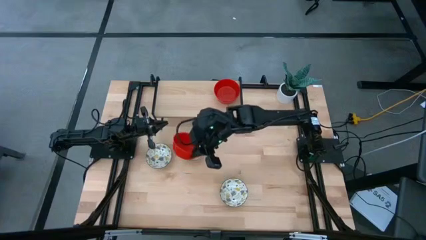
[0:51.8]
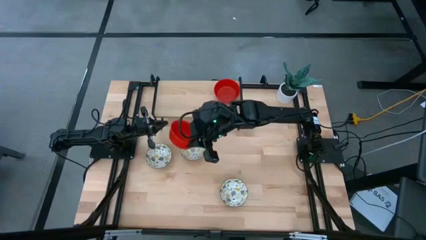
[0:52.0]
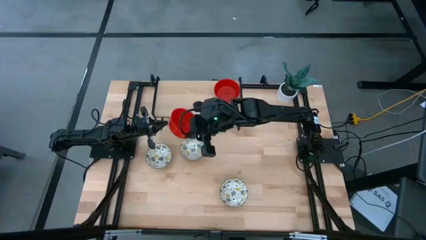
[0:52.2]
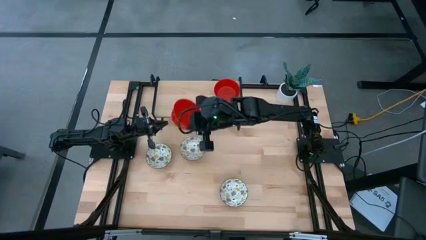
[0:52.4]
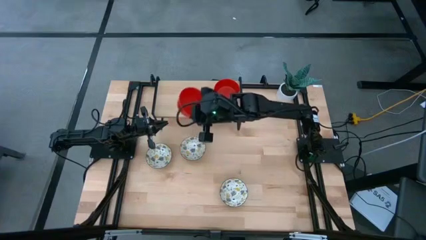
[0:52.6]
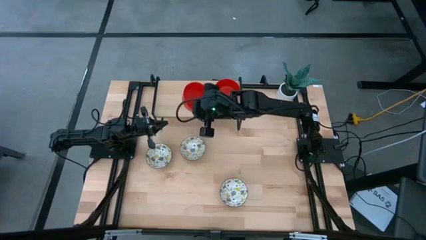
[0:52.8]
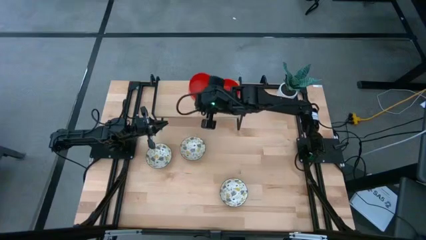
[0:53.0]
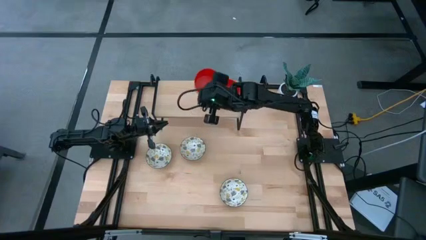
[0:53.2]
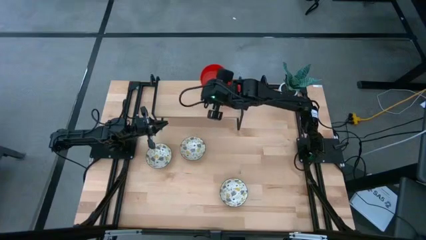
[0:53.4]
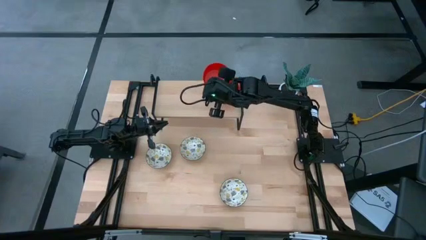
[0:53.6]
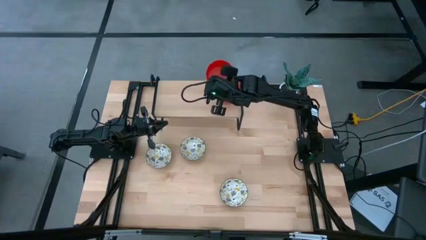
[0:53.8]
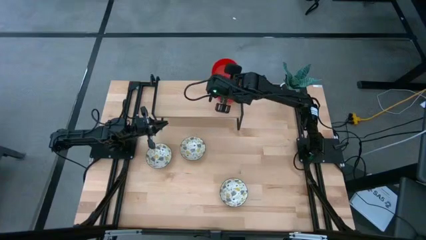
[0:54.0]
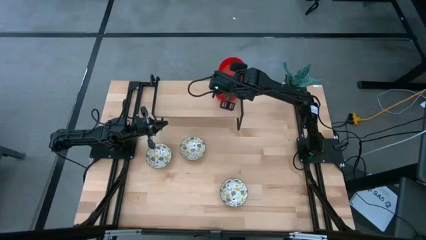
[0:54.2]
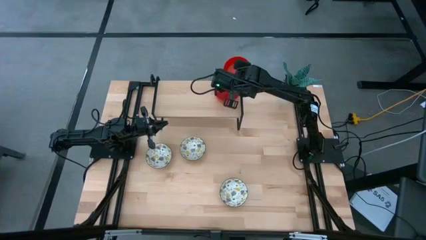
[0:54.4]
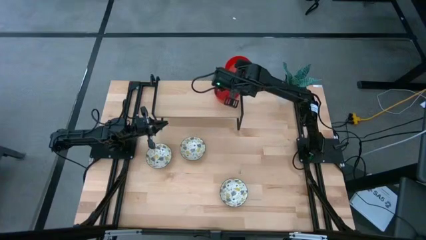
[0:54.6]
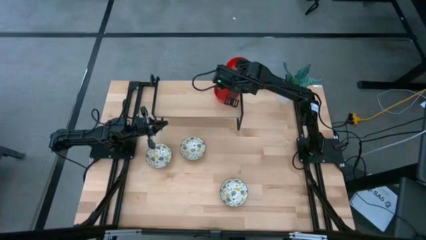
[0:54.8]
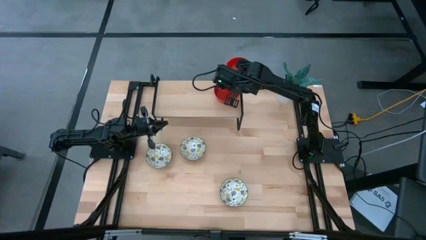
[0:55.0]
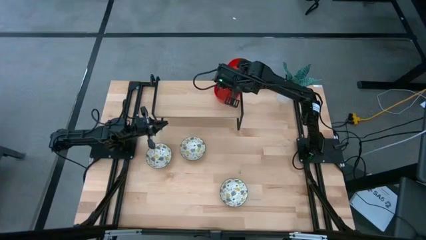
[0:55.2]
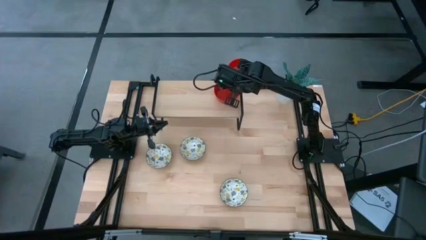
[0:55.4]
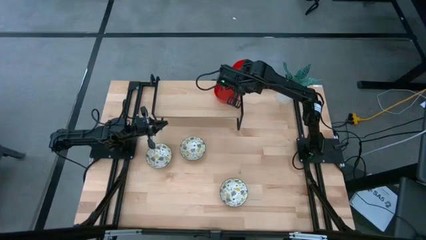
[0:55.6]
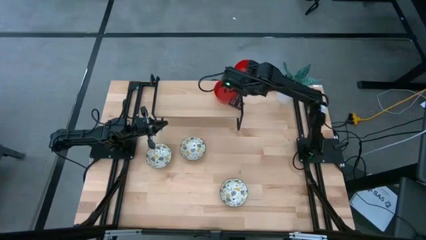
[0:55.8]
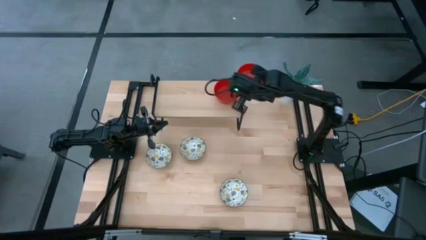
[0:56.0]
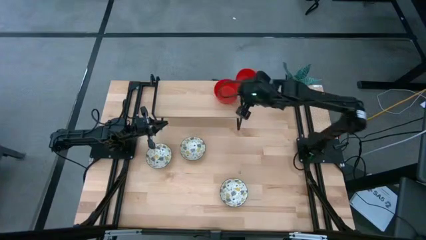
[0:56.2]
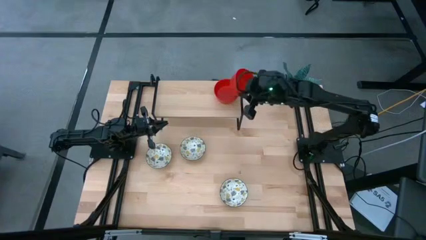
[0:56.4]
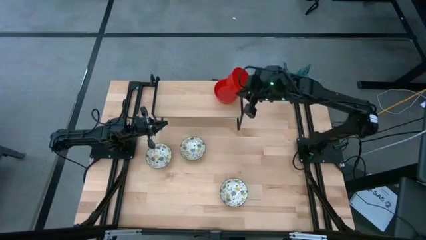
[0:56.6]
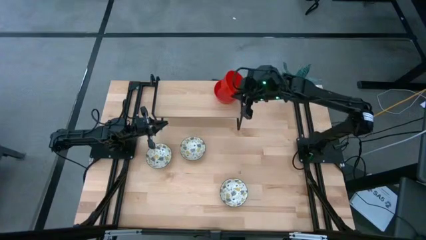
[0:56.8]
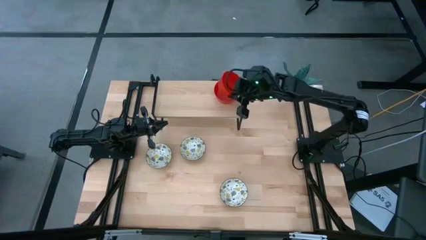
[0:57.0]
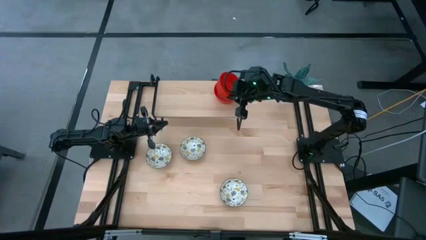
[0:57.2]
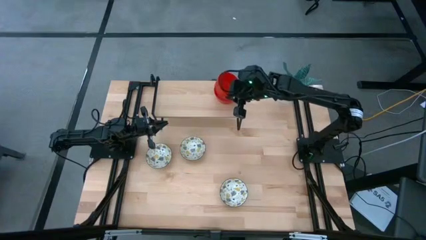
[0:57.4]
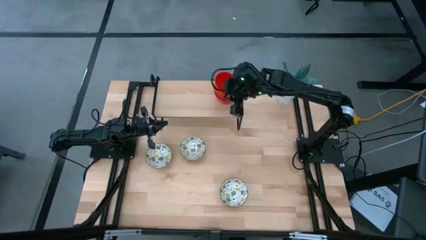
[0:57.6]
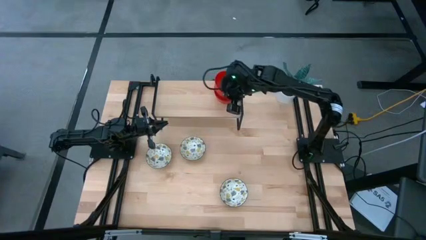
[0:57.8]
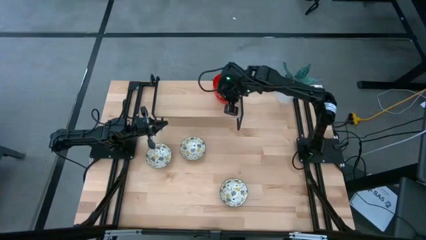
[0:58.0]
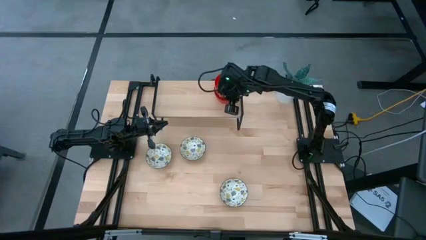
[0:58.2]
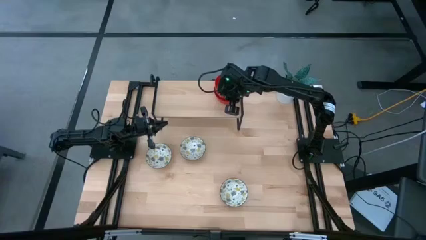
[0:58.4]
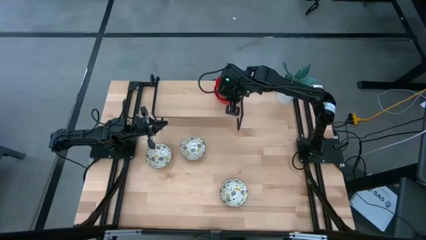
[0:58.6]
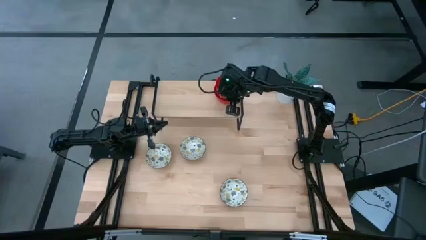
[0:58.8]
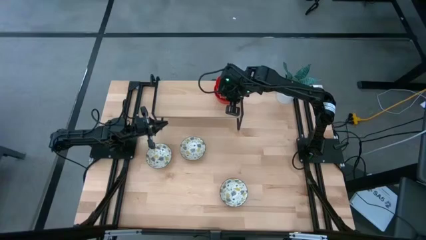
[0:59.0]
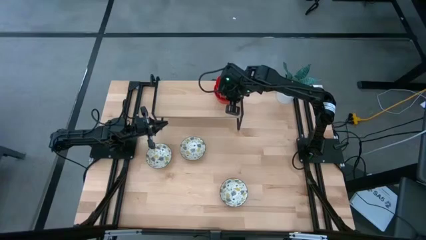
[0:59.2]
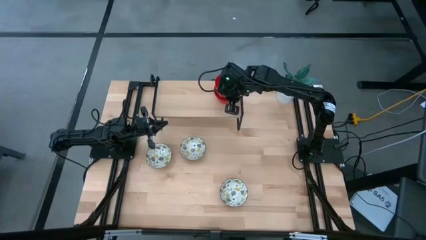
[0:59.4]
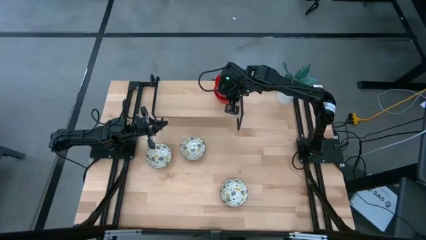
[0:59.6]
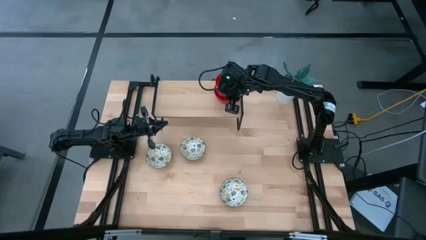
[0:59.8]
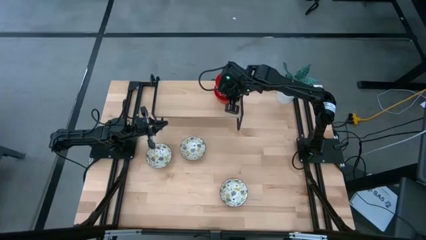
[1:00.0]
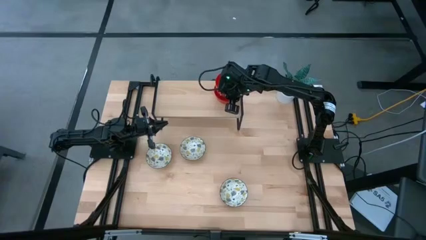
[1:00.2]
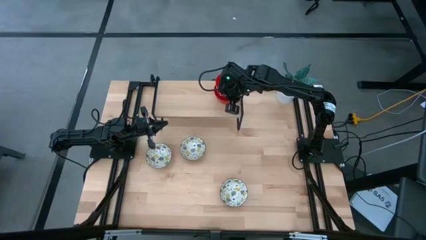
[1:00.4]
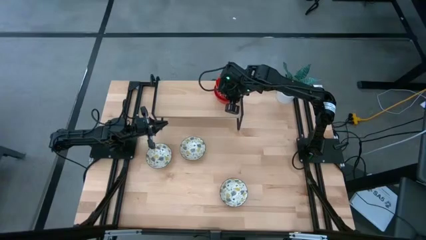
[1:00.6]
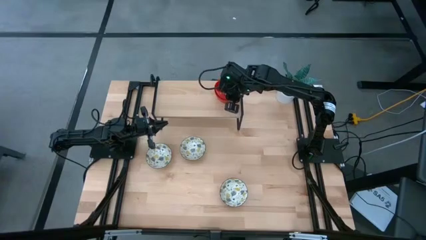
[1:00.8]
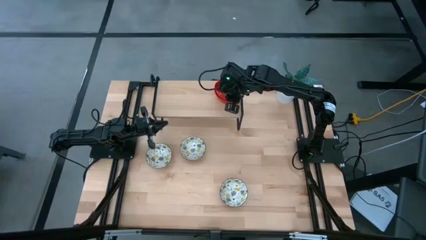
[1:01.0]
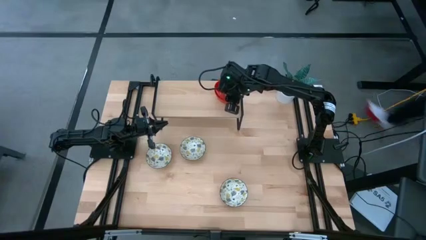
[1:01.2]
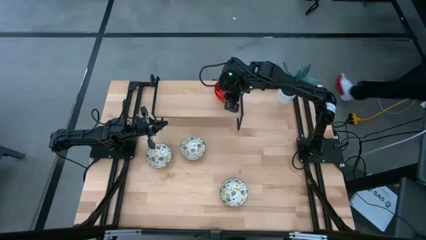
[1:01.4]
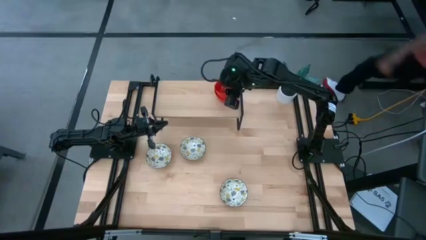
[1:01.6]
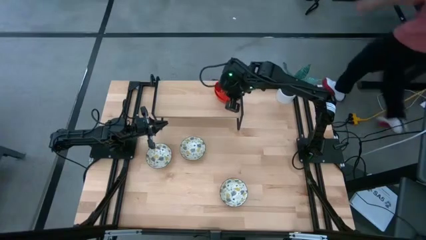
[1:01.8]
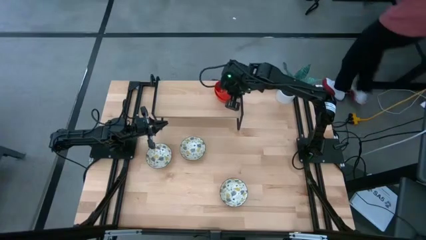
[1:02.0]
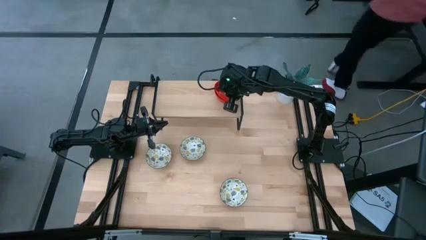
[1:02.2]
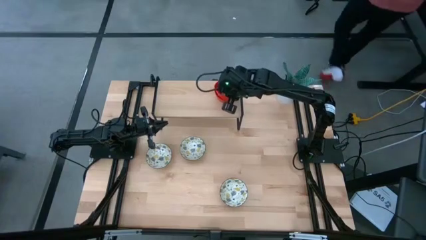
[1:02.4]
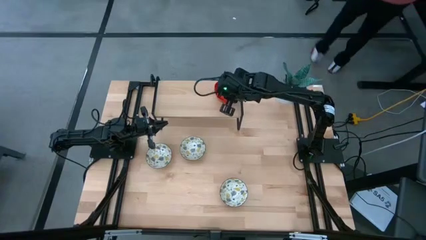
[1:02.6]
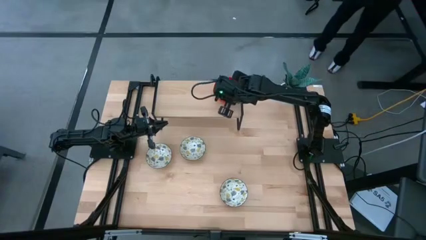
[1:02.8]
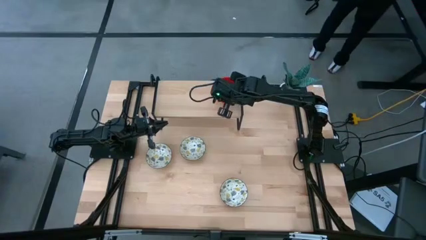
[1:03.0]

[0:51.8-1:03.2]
Task: Pick & Place Mini bowls
Stack the red bowl on the red bowl on the shelf

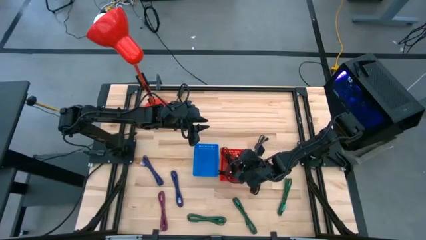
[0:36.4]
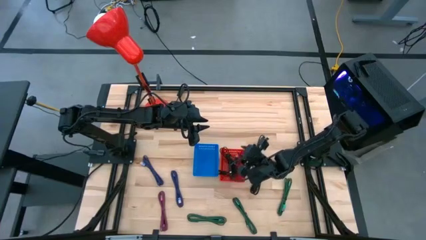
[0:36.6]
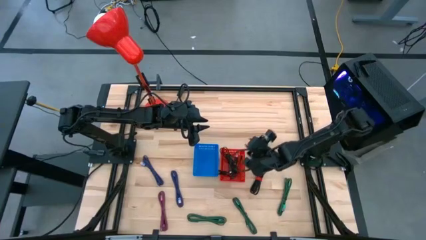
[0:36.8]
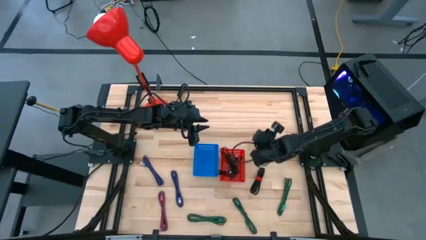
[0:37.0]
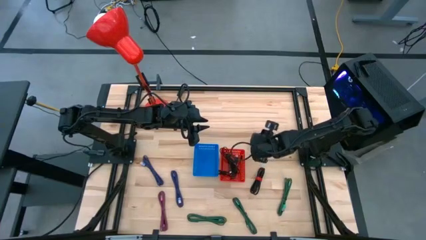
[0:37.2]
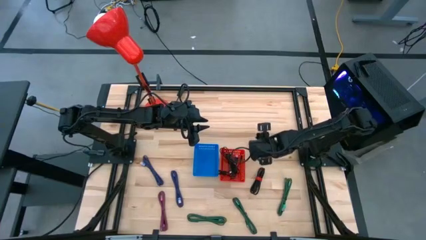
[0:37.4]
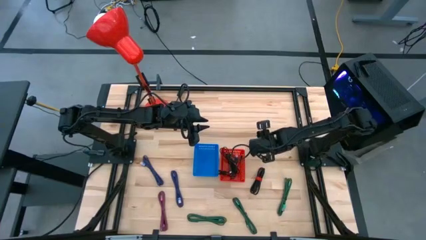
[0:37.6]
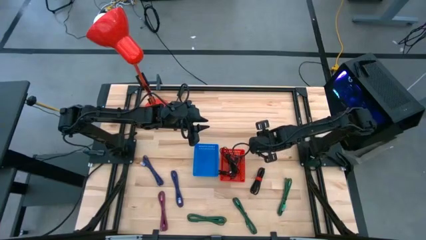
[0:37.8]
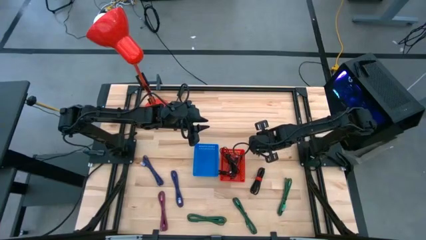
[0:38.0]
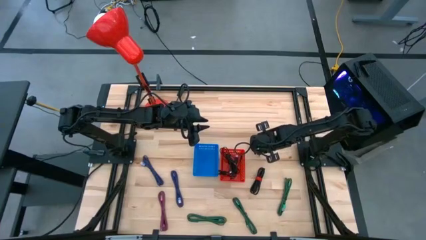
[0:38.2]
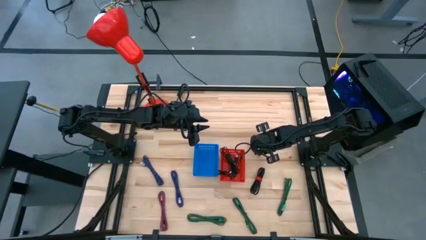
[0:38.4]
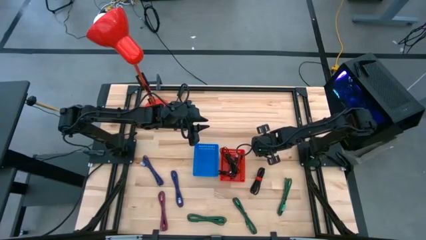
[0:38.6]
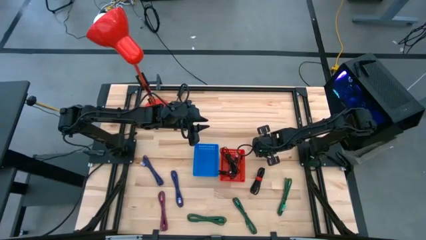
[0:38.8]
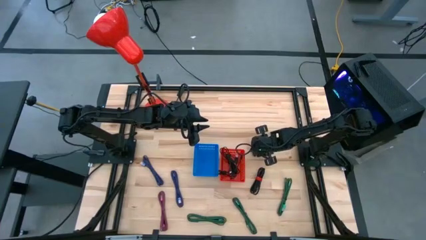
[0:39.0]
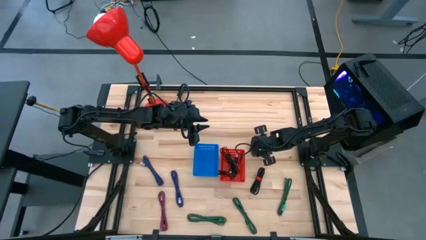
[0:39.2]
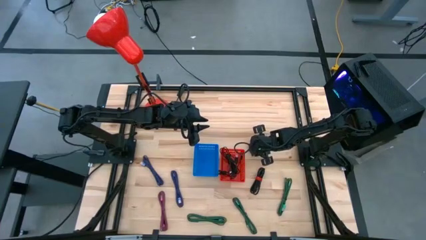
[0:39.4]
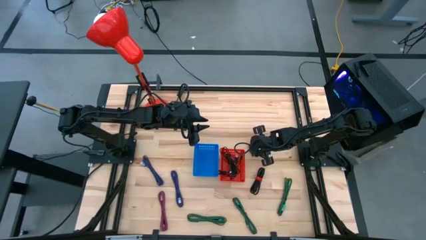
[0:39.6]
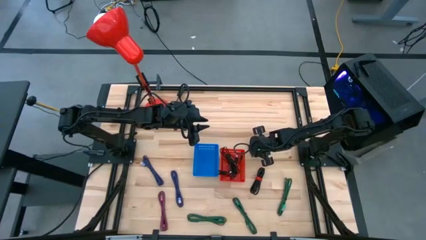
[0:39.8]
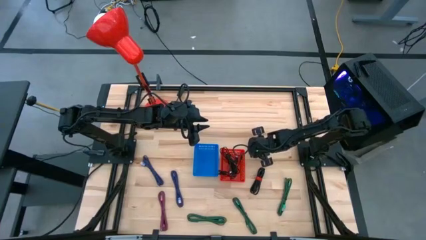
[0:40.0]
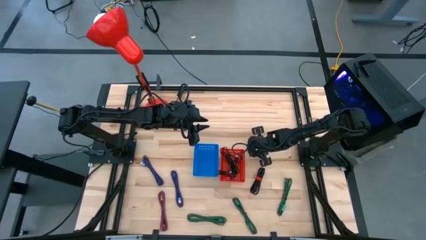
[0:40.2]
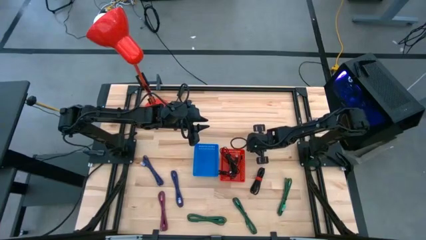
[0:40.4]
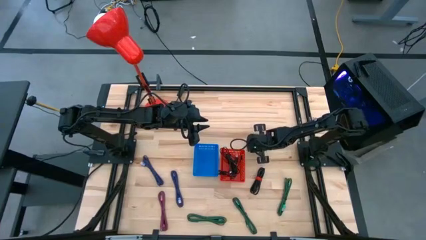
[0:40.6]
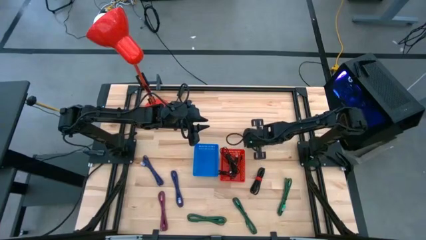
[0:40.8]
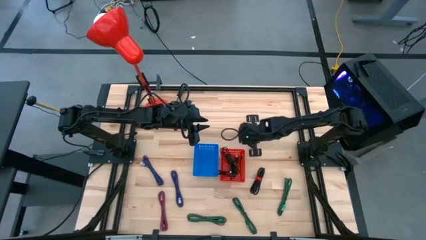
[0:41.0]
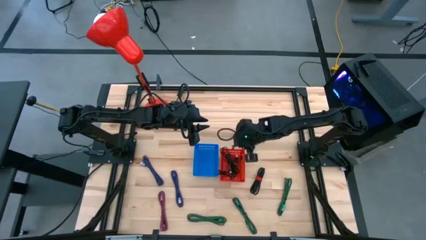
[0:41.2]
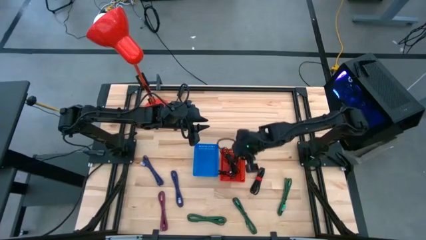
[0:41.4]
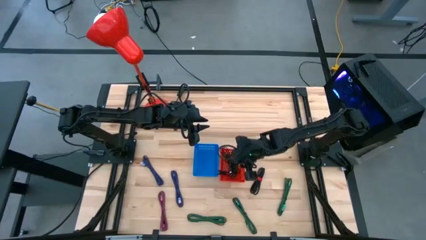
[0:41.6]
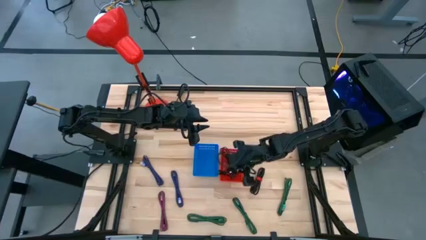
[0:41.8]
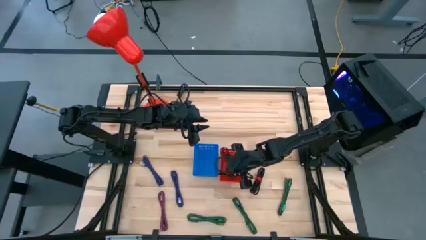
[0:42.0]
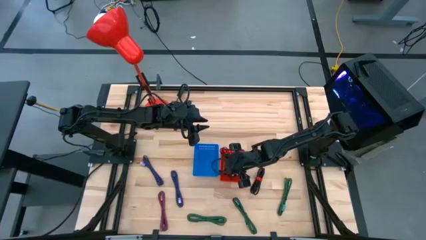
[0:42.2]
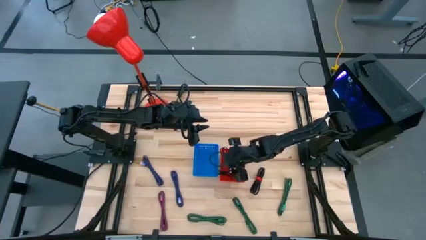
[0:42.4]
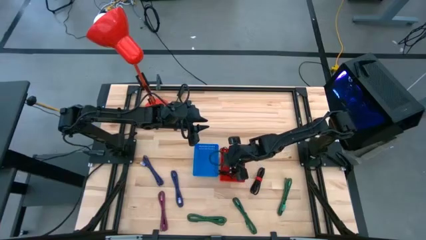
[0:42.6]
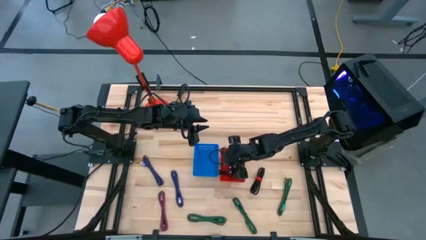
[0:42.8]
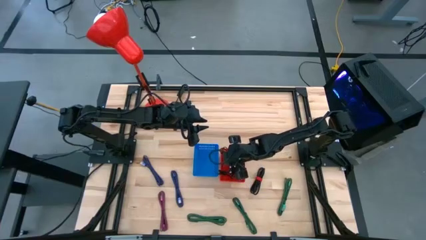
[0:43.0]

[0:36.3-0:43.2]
Task: Pick & Place USB Port
Put the black charger cable into the red bin
